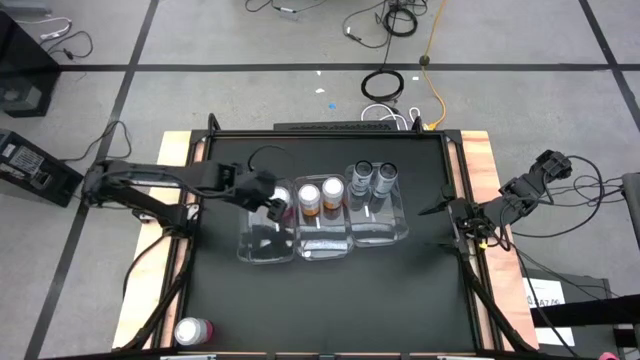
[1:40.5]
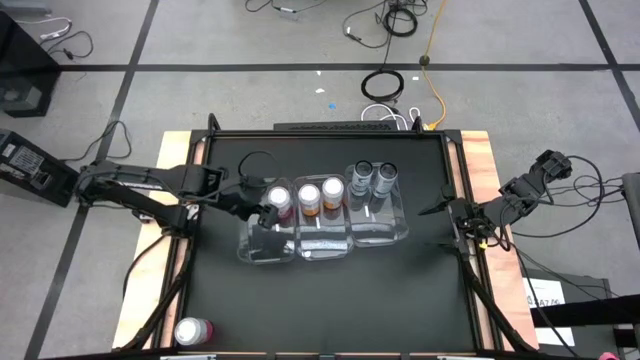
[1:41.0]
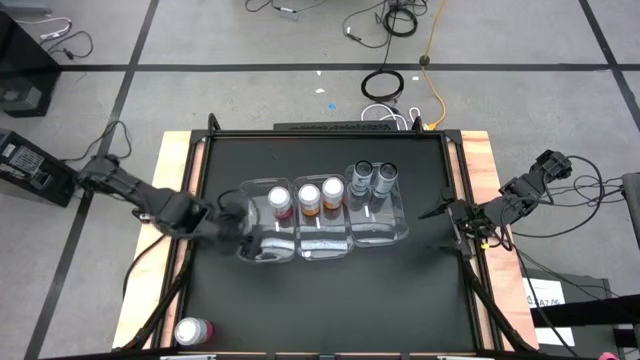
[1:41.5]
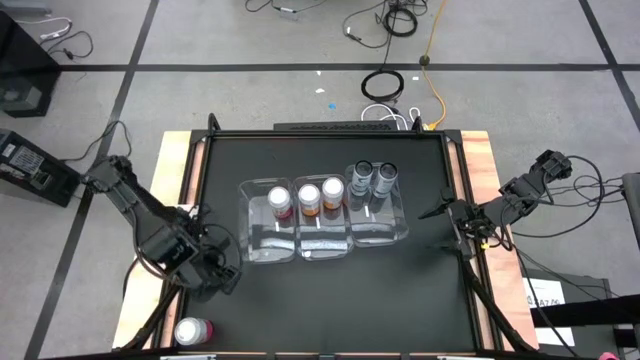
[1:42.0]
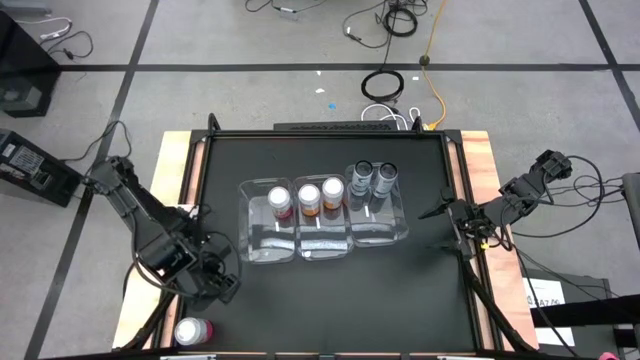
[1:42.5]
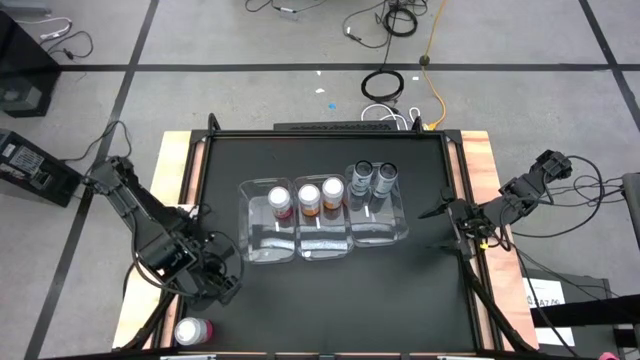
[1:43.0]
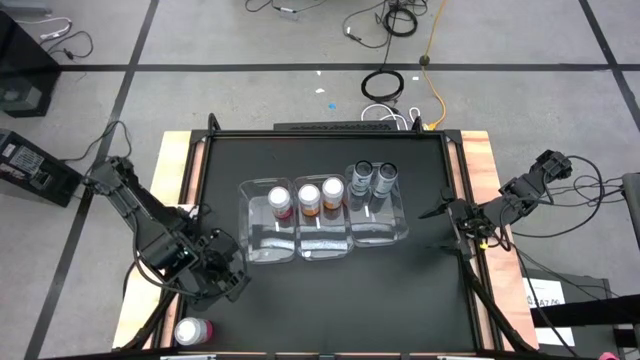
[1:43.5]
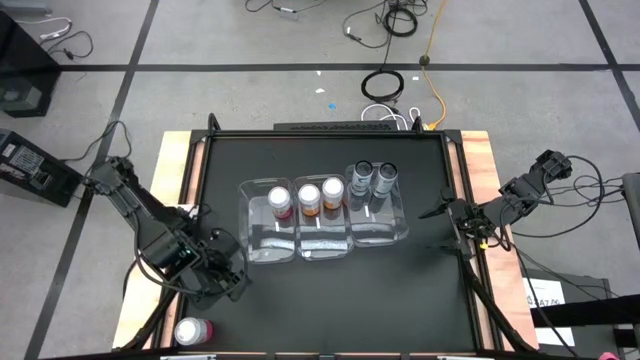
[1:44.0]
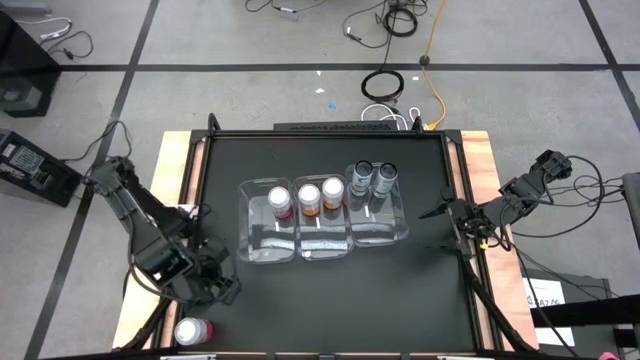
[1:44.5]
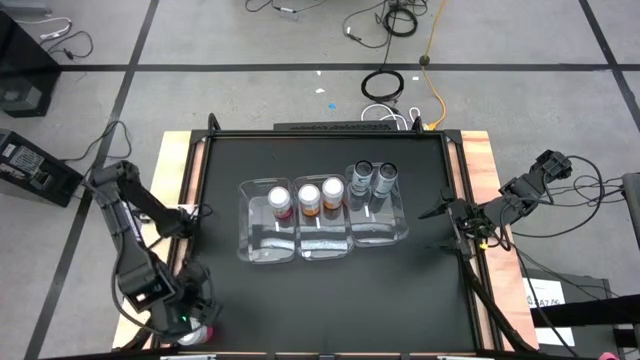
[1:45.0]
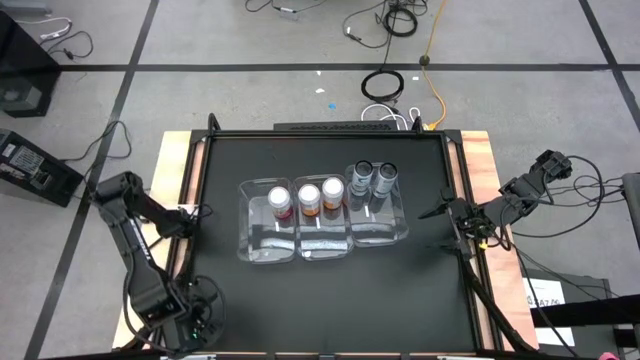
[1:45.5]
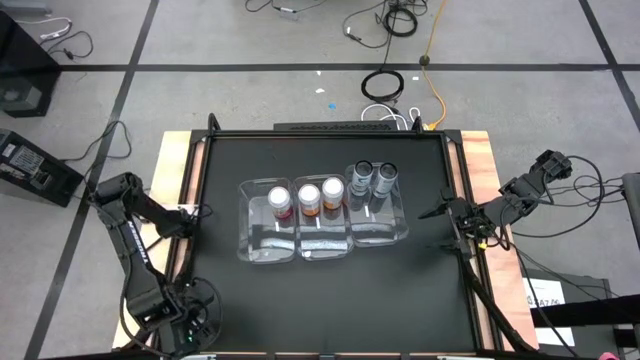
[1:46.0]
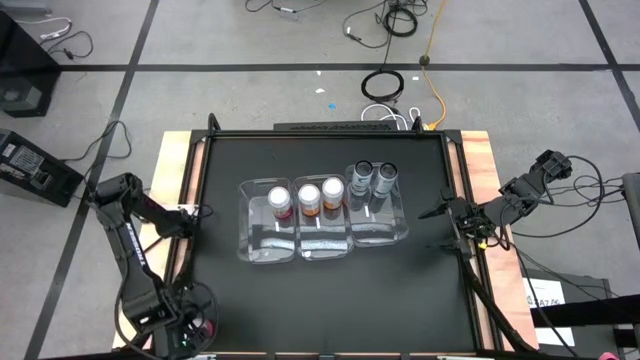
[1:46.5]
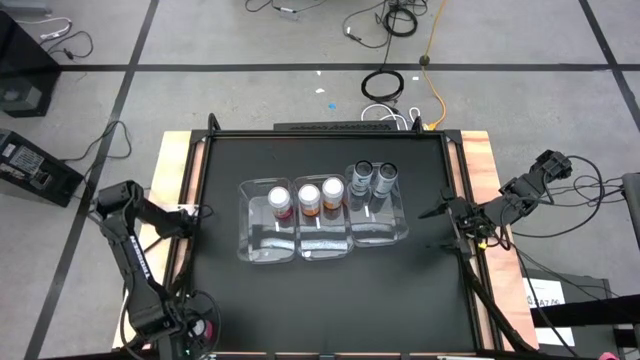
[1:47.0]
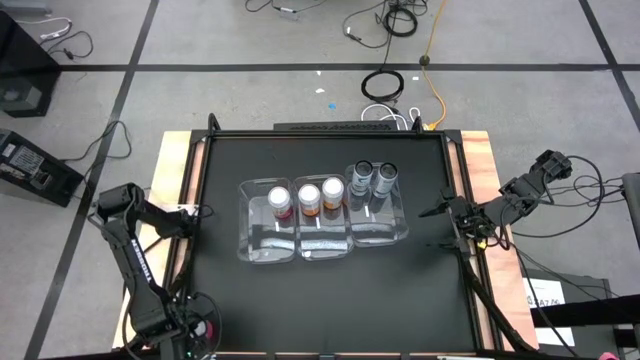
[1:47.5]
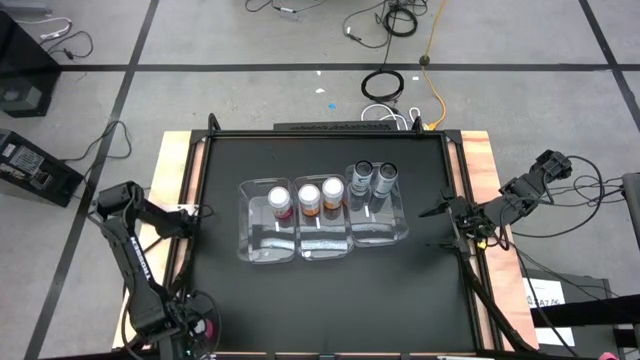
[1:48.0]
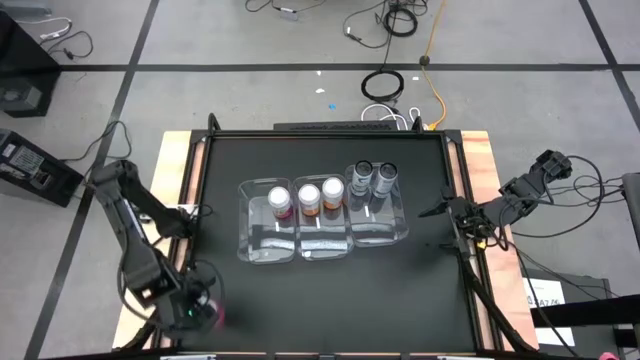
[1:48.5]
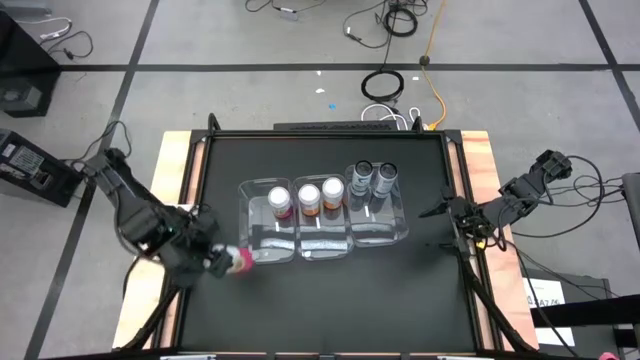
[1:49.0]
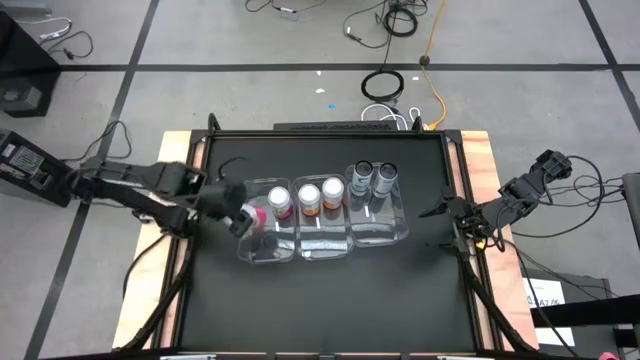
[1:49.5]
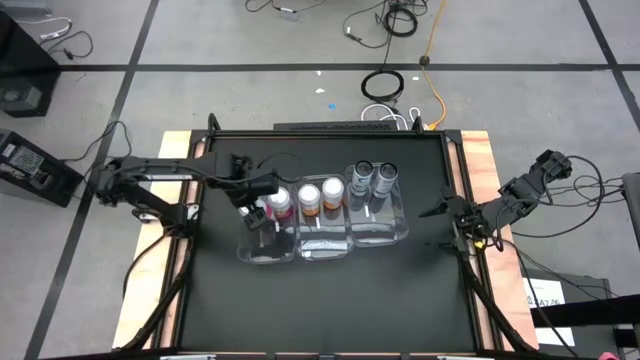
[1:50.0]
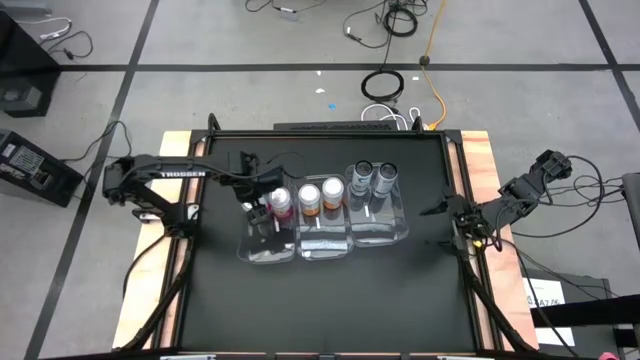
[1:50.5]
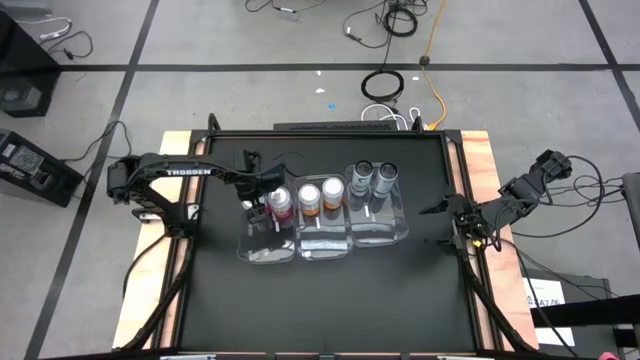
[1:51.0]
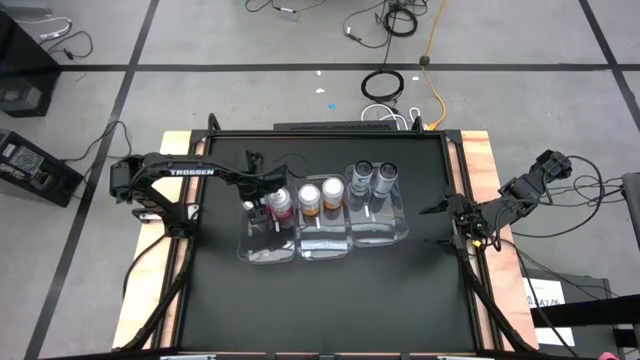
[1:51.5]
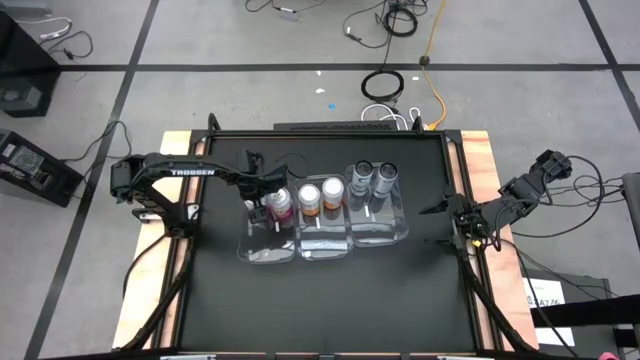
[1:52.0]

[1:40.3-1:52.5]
Task: Sort soda cans
Put the red soda can into the transparent bin

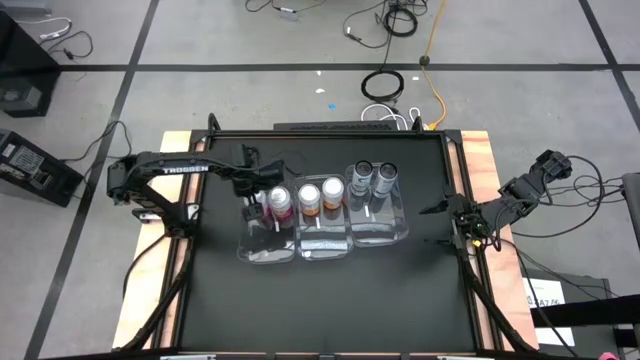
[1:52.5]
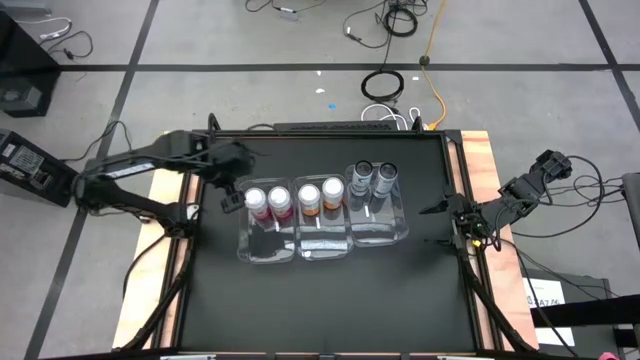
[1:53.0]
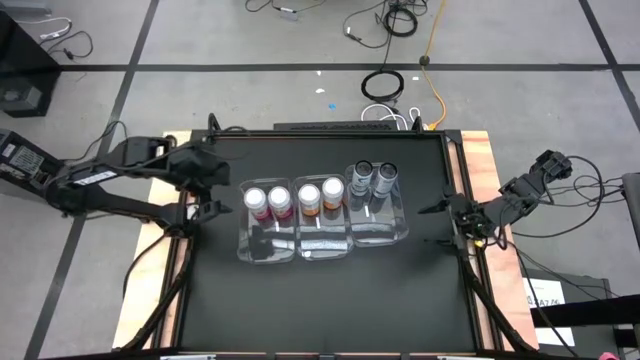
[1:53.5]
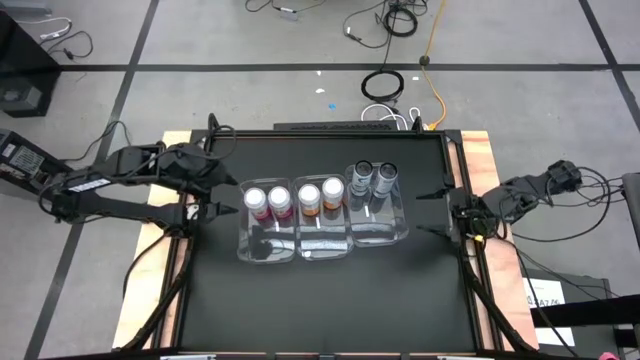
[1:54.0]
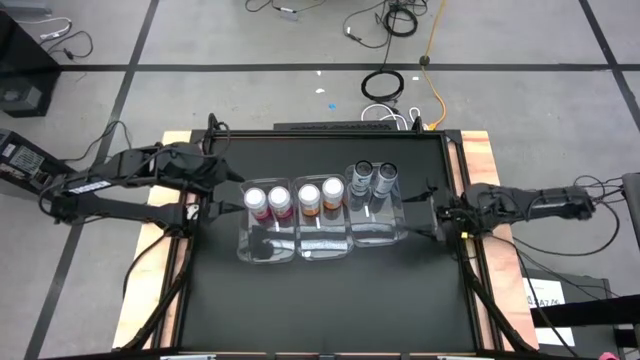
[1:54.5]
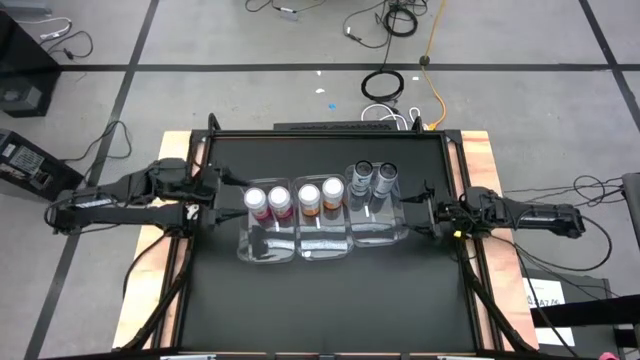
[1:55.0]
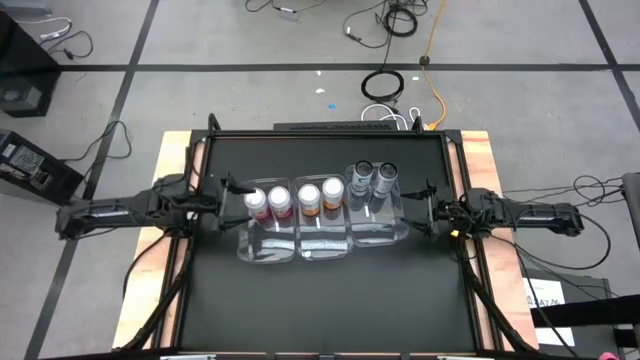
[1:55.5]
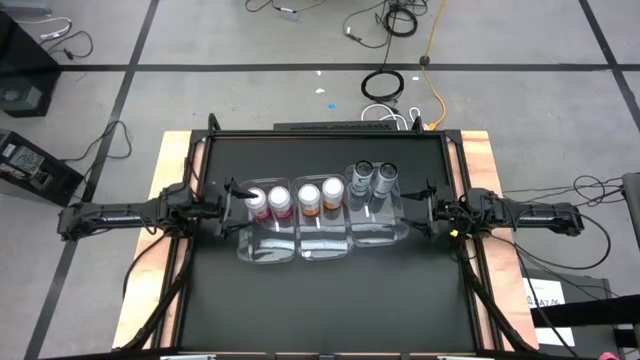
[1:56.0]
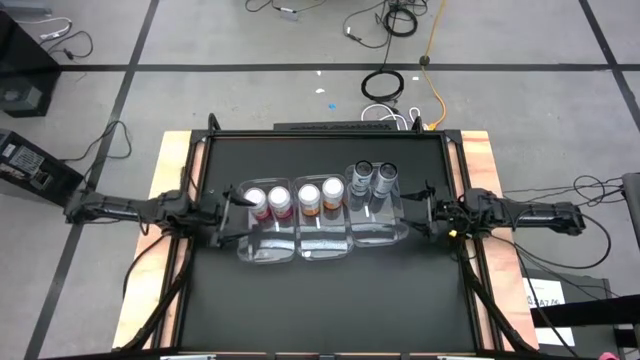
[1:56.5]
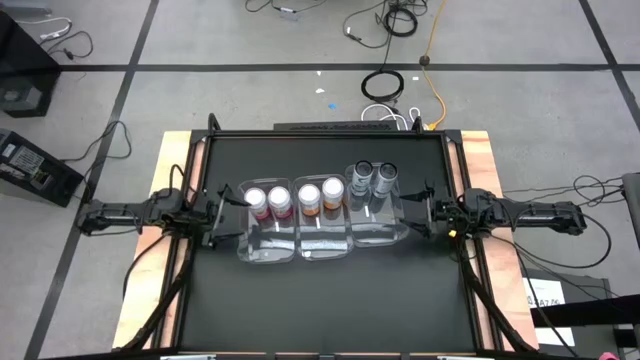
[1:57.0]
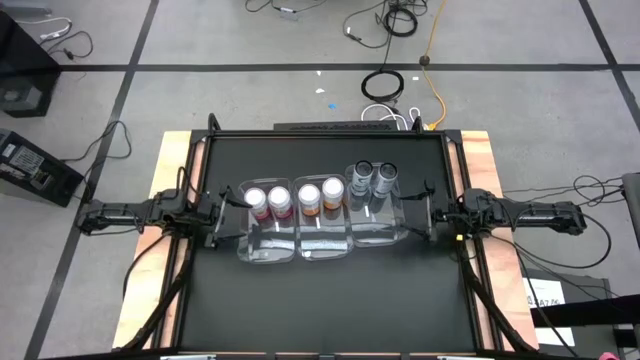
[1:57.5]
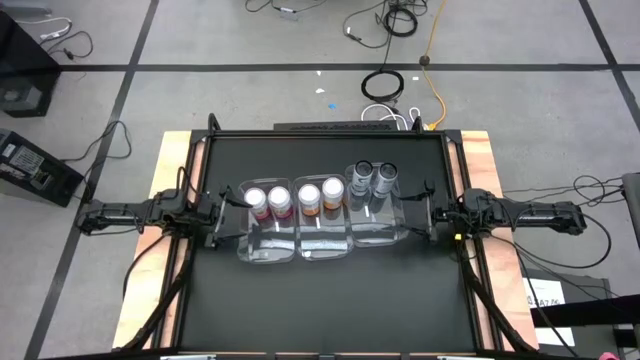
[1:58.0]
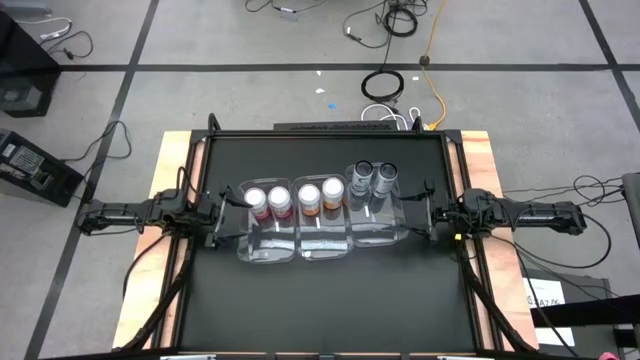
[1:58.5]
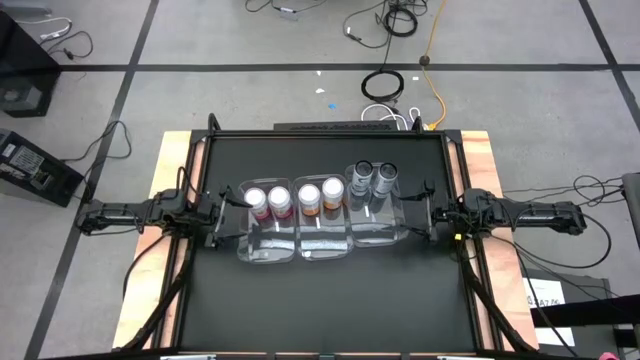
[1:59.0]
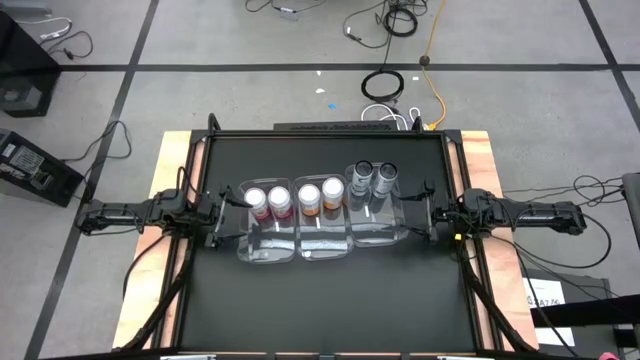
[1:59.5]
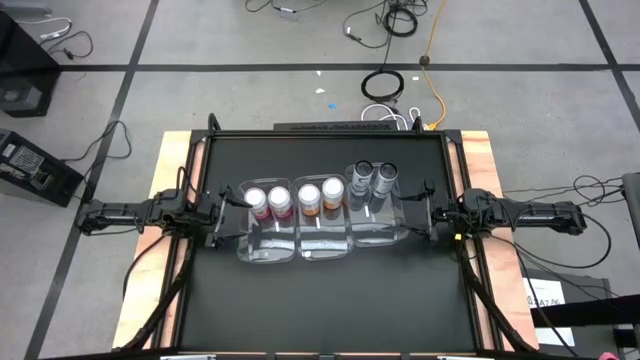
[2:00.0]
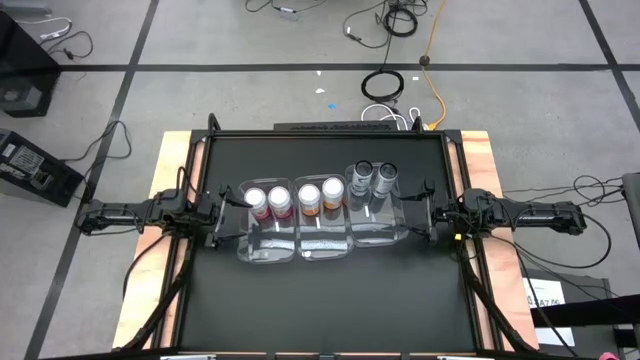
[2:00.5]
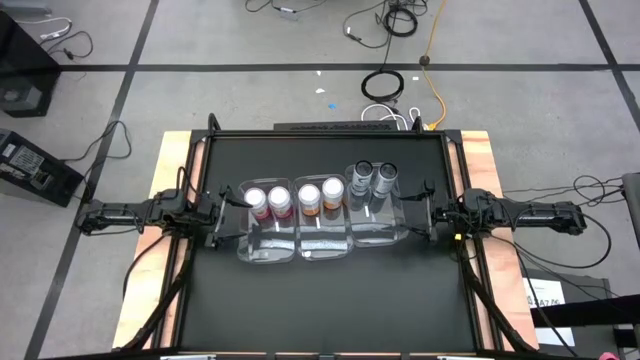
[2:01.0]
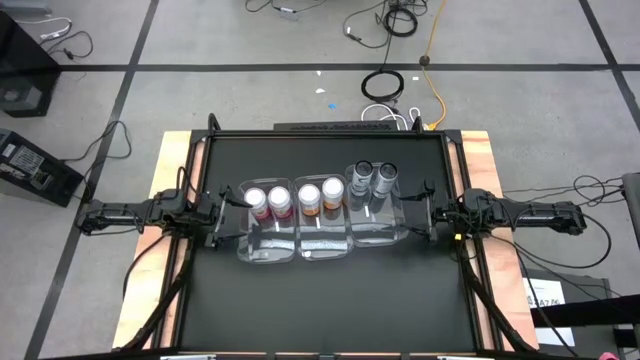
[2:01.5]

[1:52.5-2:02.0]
Return to Home Position

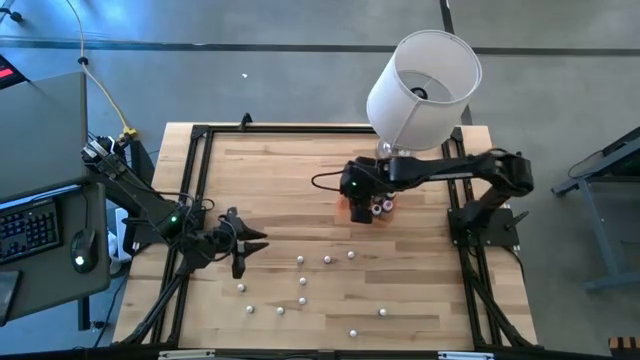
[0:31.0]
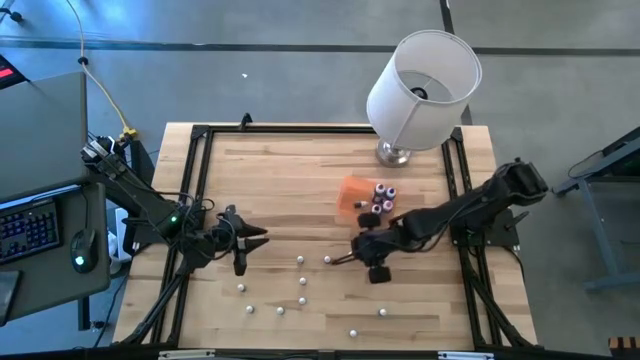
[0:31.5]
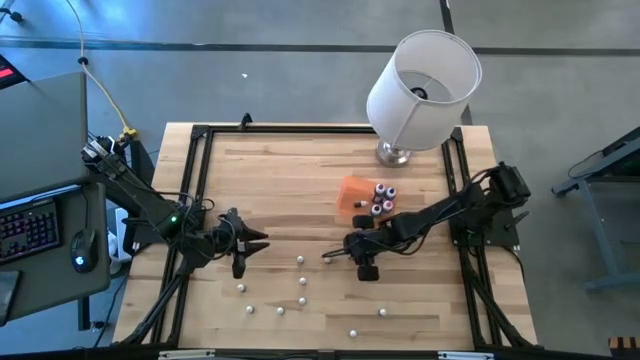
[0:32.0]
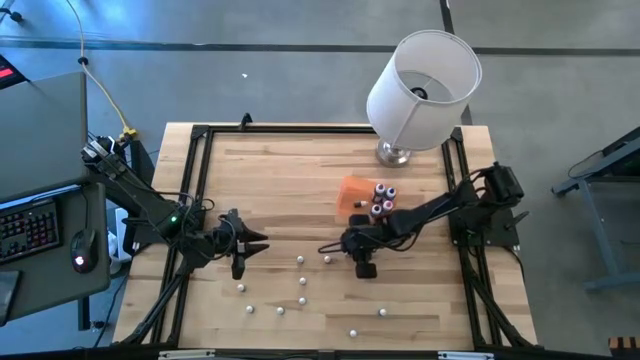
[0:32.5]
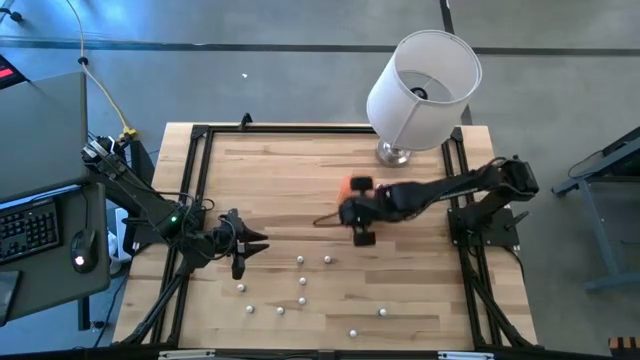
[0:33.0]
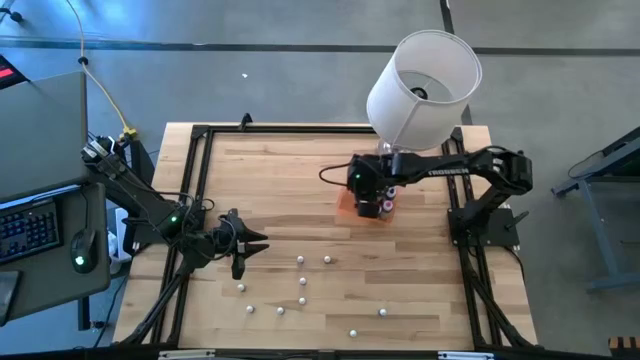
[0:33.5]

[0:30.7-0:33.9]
Task: Pick & Place food coloring
Put the small orange food coloring bottle into the orange container
